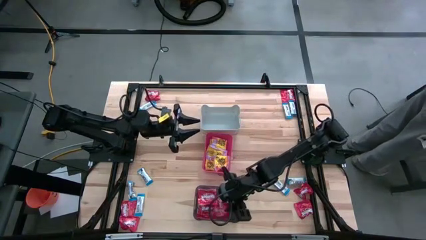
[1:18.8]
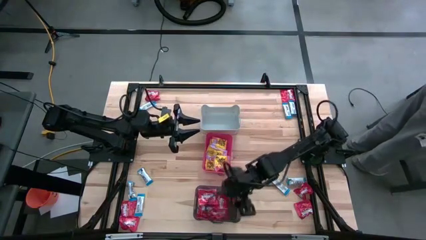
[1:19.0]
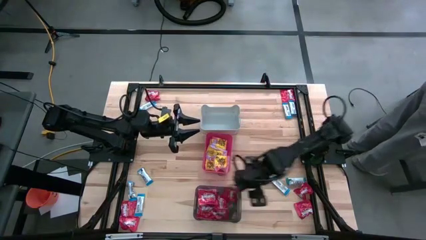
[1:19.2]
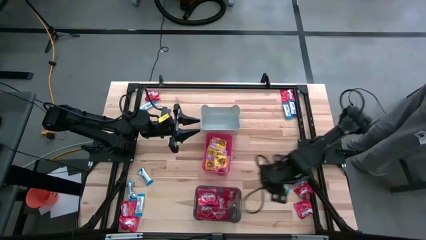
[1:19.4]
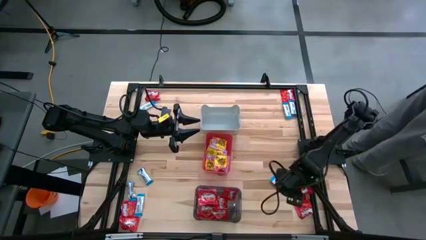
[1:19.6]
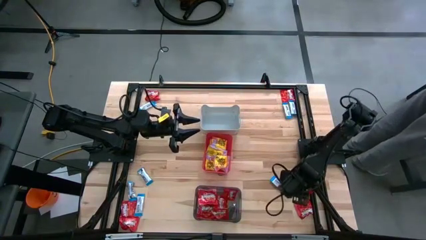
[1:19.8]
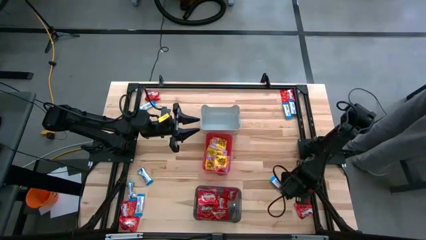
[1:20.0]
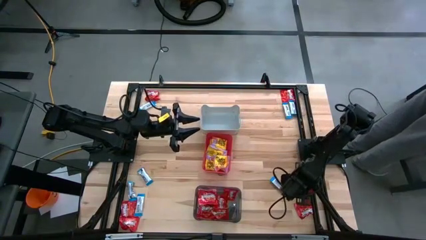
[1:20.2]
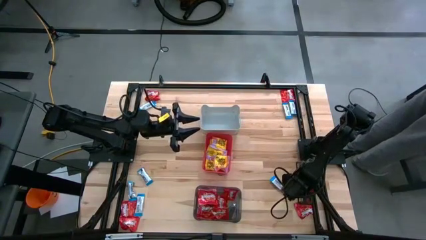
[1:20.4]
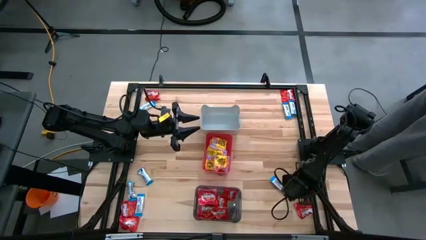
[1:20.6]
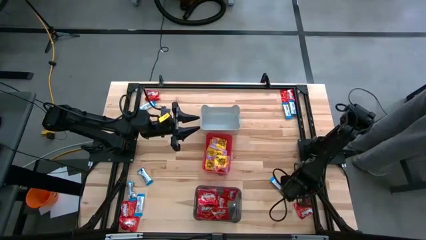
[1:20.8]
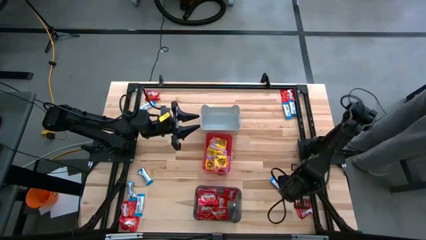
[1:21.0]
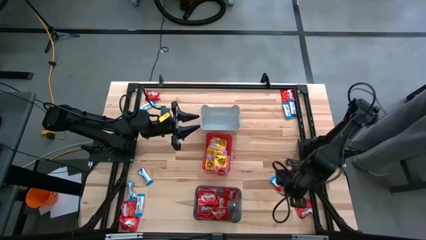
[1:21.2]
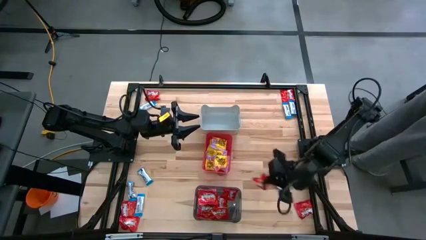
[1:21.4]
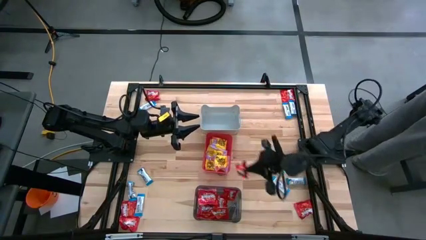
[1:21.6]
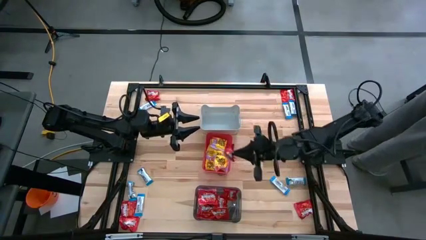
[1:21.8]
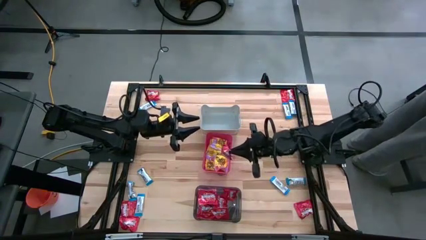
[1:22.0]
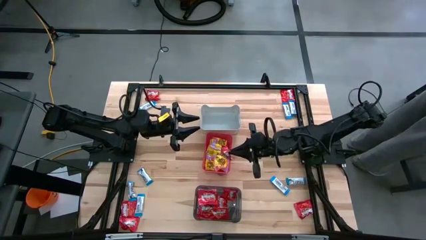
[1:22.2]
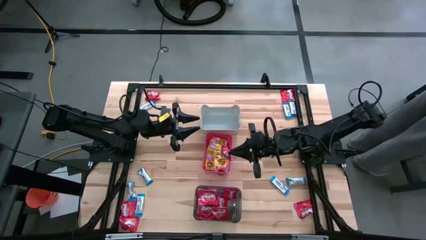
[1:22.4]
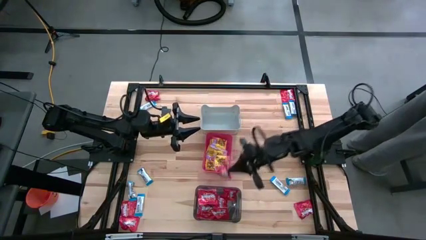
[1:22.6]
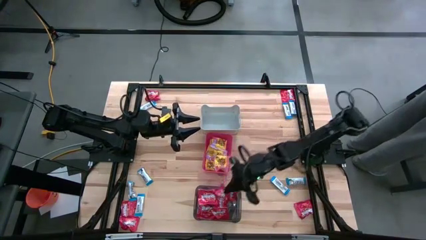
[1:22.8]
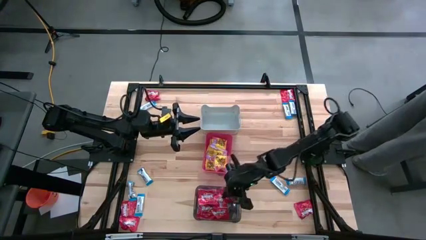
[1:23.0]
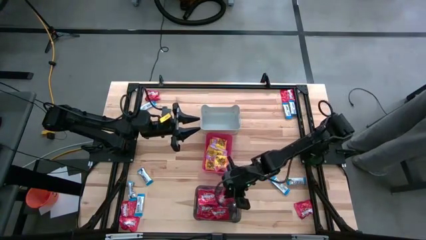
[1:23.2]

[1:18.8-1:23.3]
Task: Sort candy
Put the red candy into the black bin

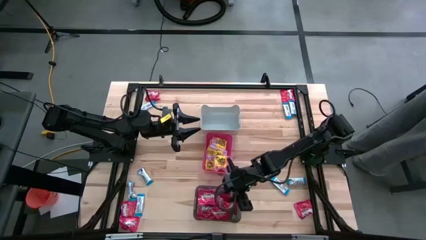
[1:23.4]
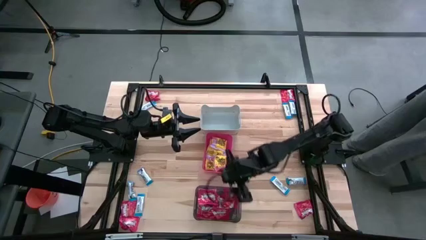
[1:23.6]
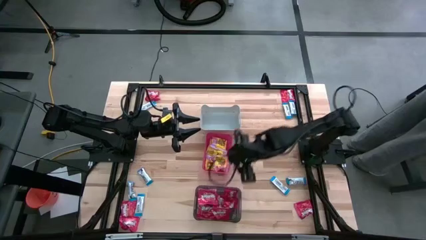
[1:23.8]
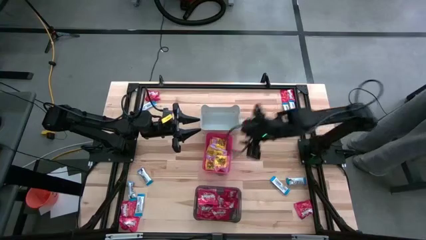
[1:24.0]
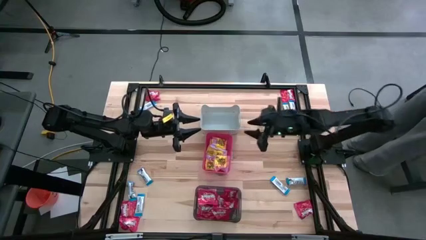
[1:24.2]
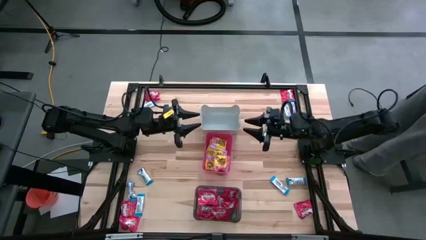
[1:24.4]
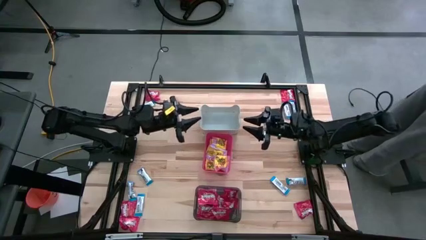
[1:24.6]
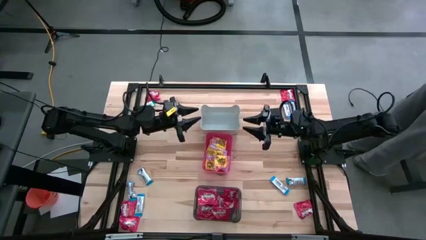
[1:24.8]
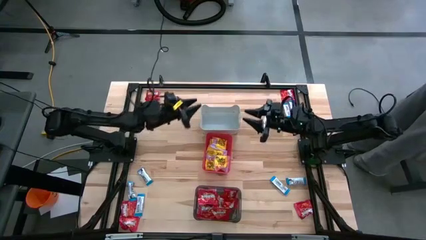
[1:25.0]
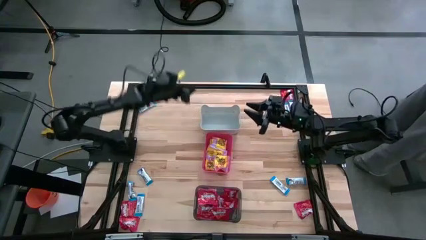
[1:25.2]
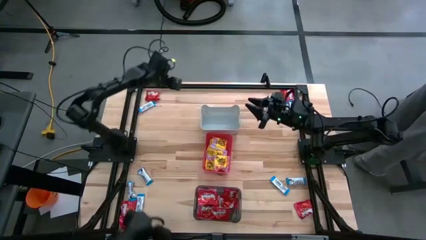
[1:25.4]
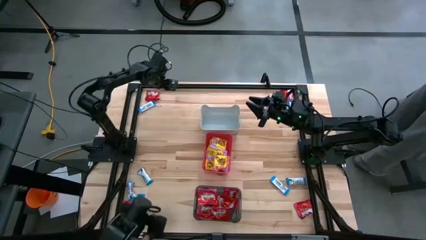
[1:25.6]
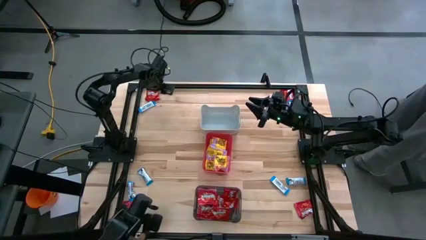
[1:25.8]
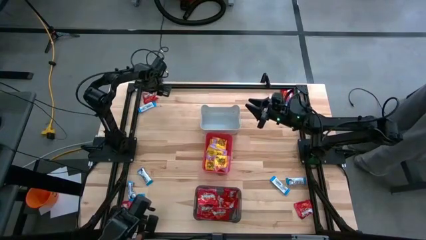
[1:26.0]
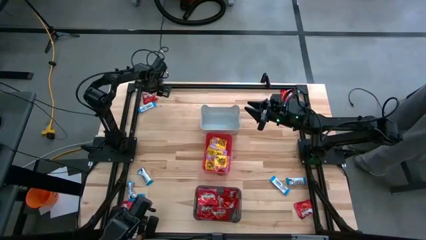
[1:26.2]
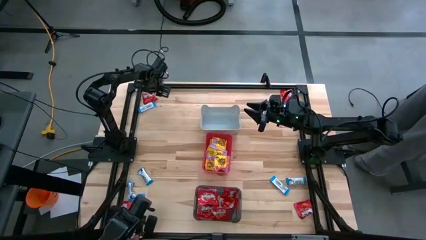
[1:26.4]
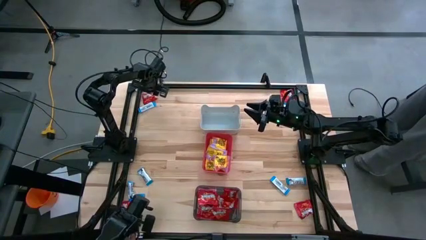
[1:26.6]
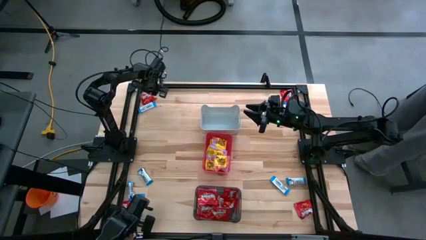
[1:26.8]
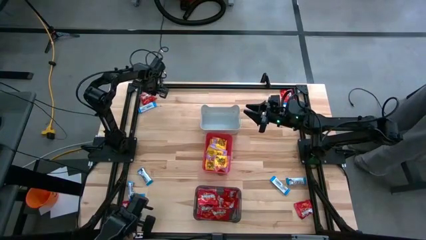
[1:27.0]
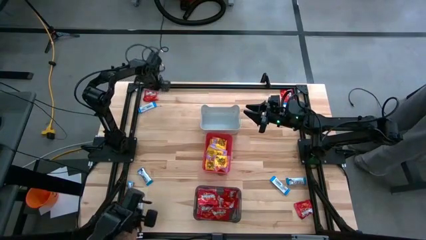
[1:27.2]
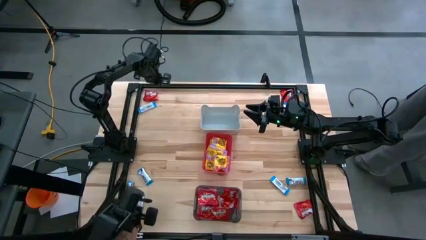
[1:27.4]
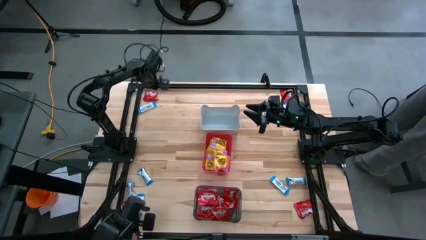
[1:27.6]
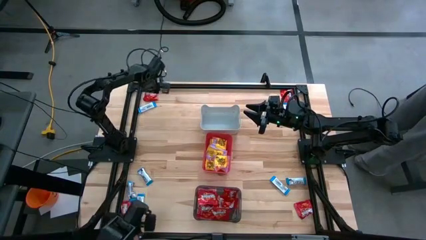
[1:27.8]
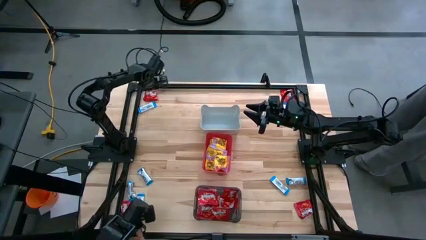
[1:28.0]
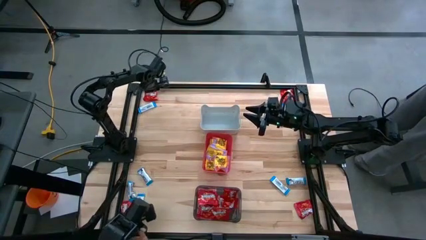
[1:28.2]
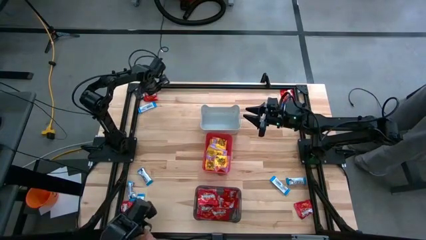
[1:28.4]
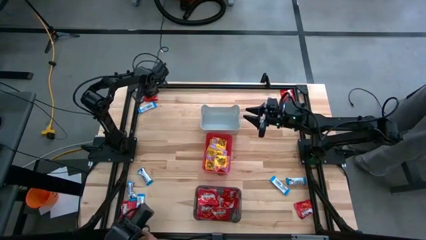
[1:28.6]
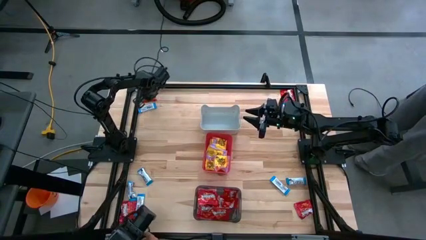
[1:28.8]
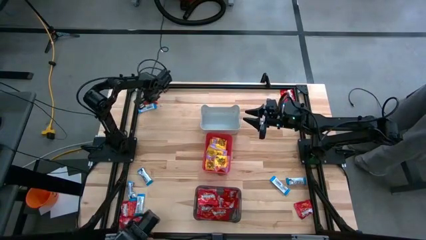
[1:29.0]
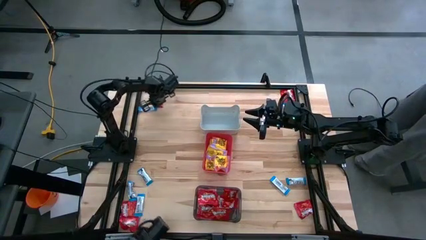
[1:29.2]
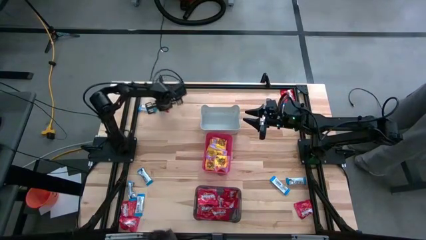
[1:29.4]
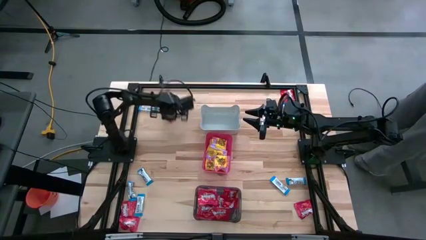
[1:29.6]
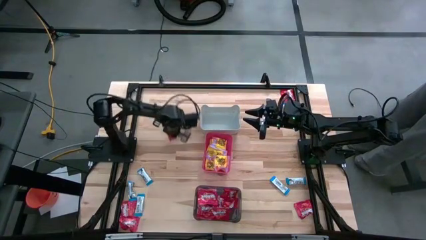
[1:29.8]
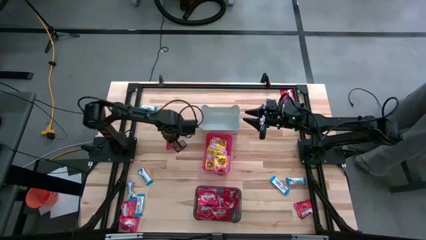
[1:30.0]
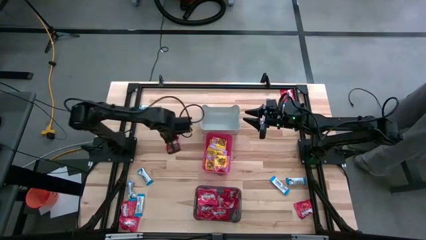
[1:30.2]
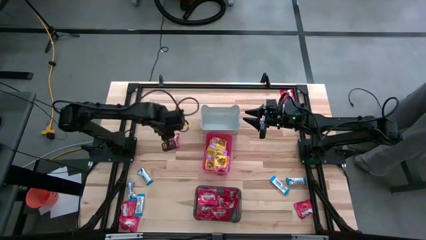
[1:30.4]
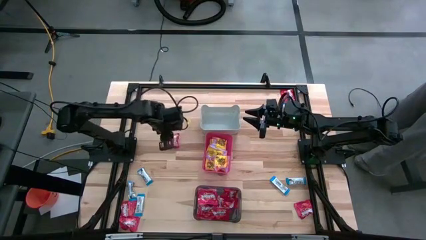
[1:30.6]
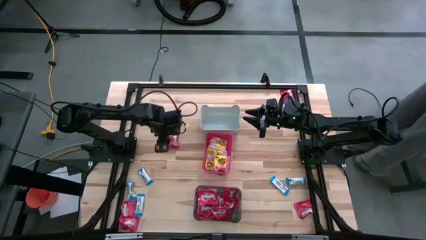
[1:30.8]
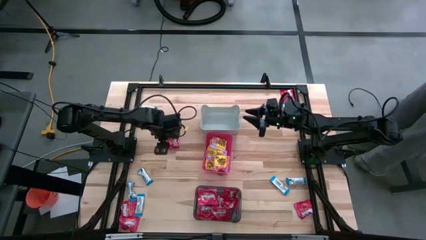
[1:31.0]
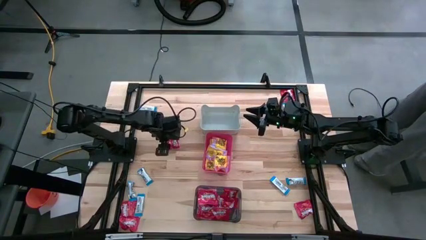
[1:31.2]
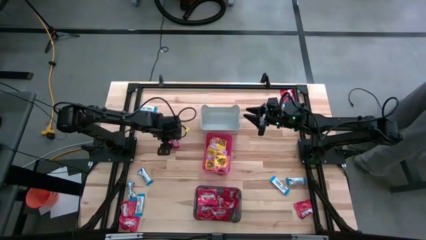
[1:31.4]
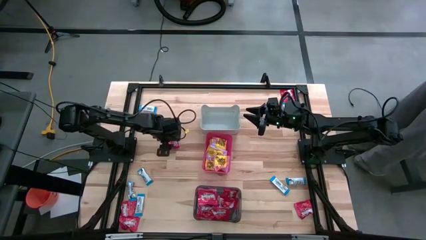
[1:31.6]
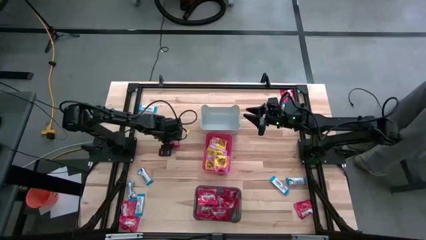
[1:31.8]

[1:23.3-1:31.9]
Put the red candy into the black bin

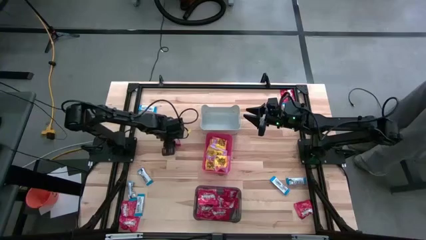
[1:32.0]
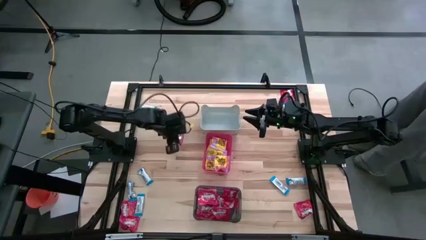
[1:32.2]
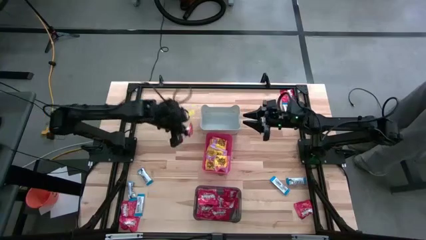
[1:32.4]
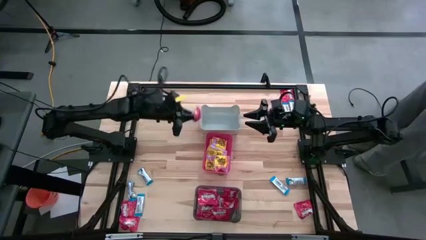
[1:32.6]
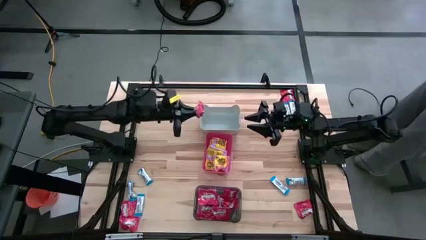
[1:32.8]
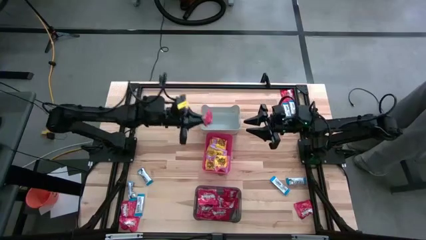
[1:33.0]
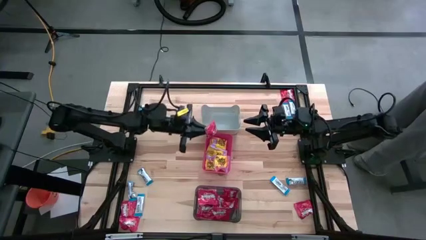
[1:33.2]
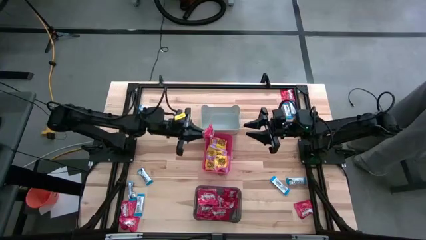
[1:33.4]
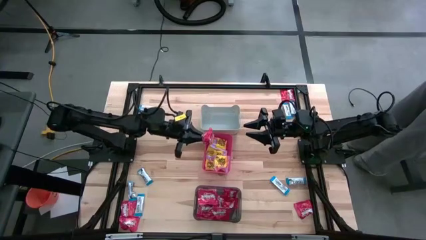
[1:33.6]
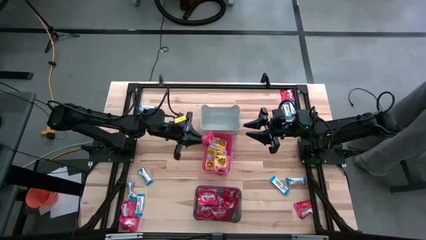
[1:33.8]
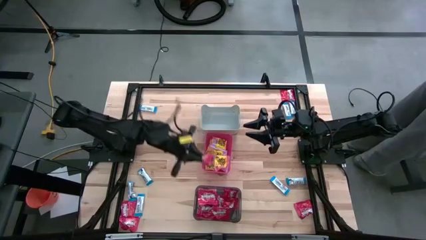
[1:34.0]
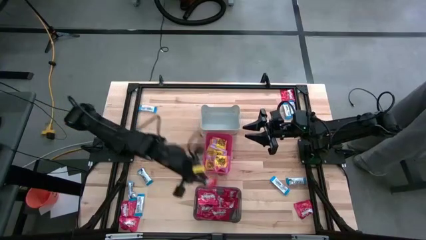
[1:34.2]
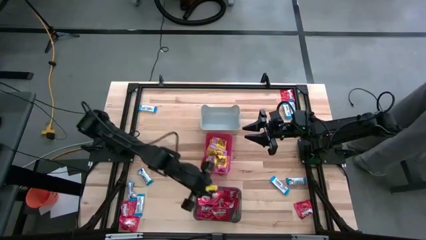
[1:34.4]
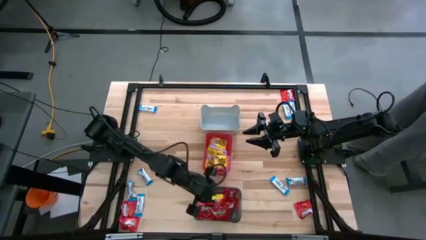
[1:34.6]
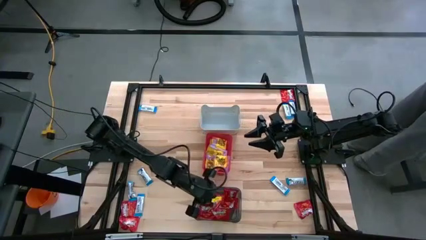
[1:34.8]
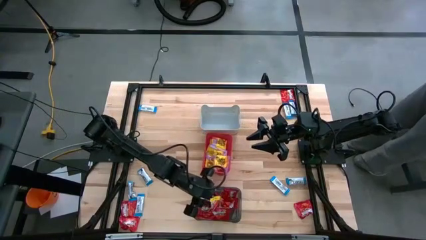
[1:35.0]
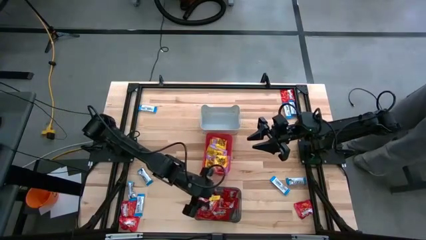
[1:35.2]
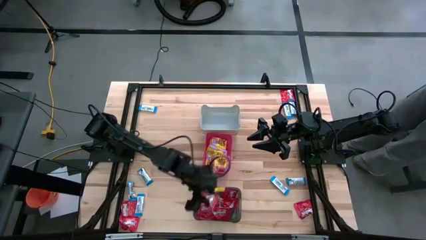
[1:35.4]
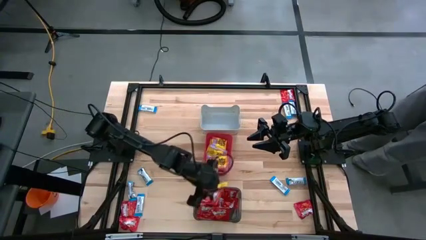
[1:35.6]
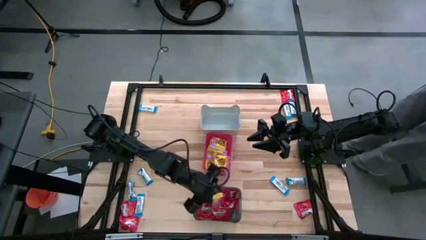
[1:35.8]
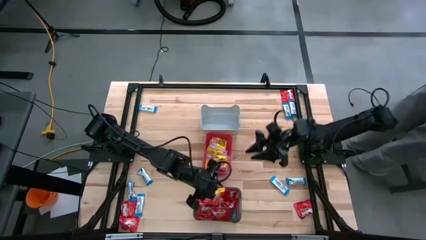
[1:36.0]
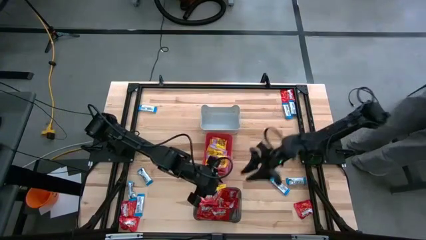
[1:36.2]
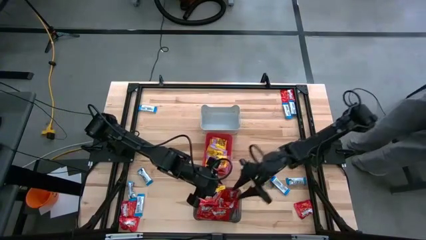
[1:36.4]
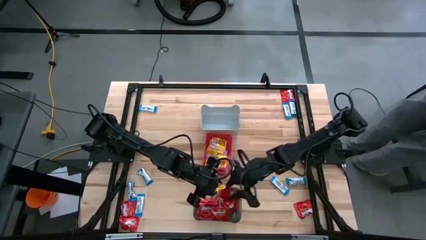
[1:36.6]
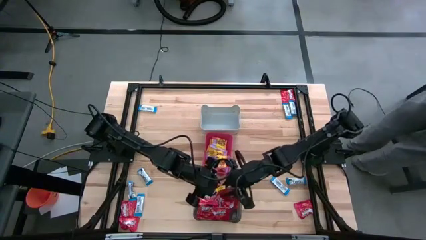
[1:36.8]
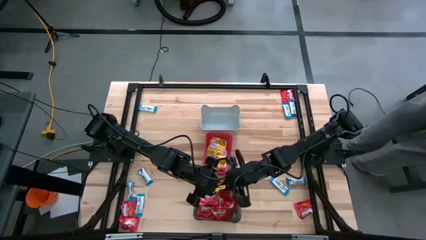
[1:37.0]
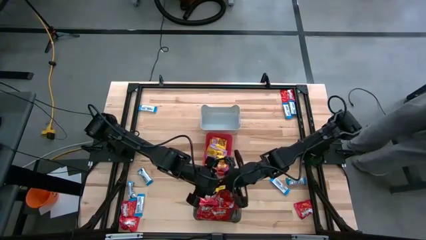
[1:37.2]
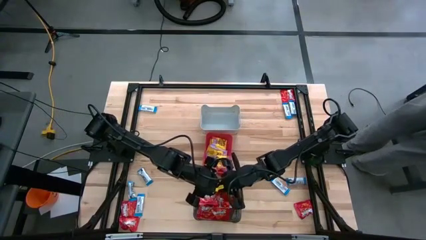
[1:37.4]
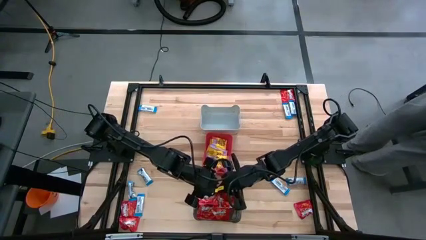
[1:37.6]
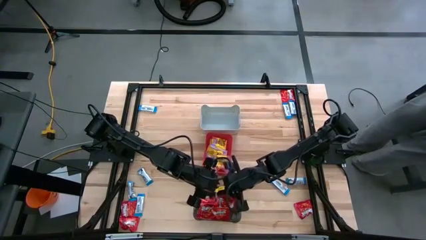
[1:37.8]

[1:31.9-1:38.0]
Put the red candy into the black bin
